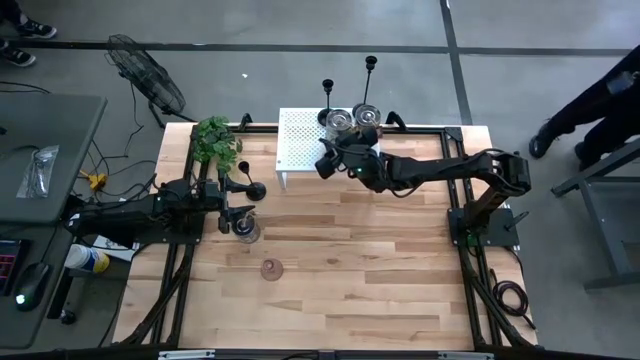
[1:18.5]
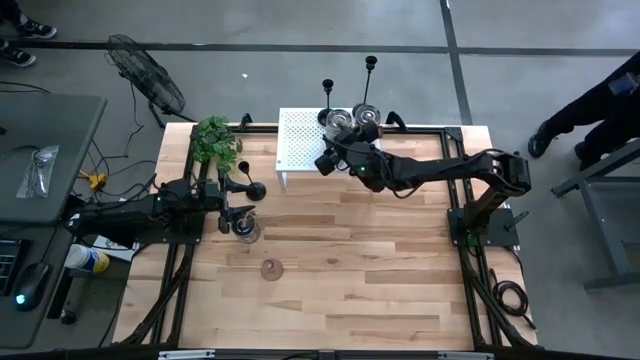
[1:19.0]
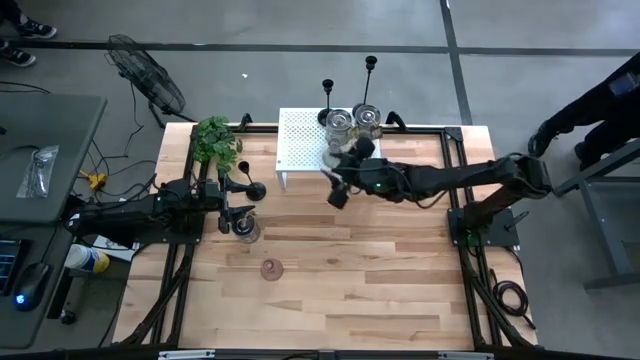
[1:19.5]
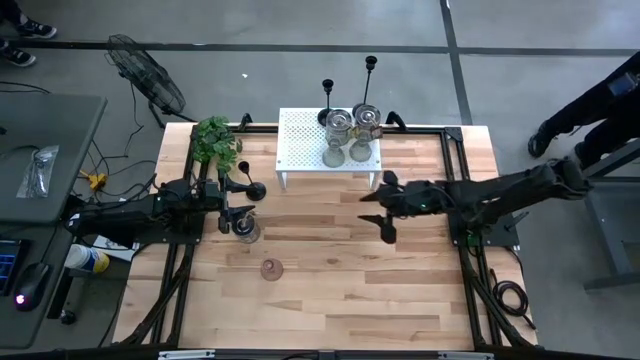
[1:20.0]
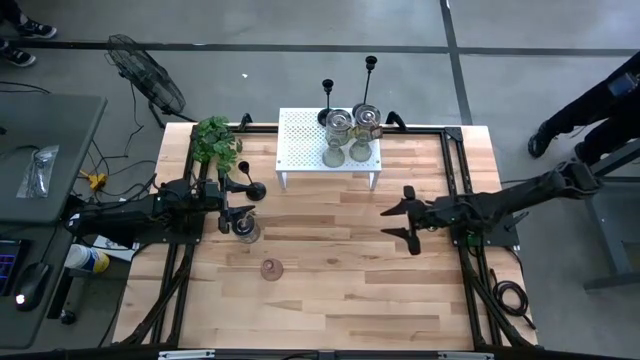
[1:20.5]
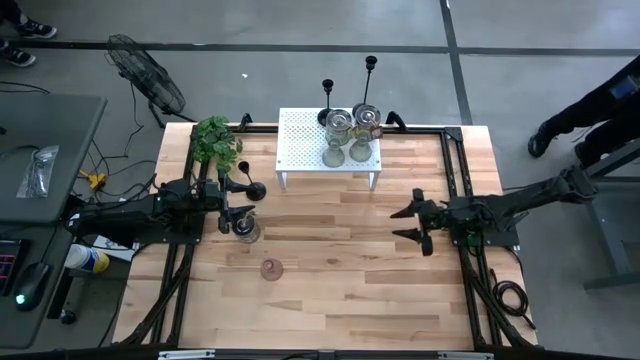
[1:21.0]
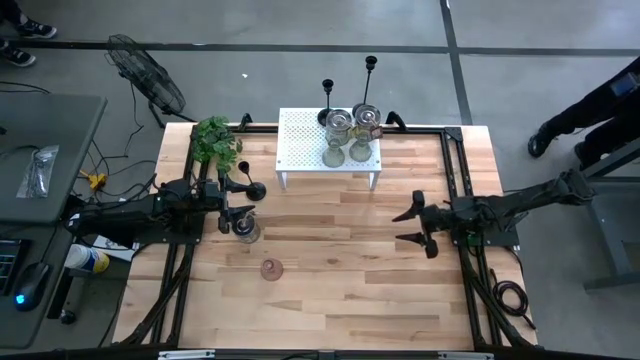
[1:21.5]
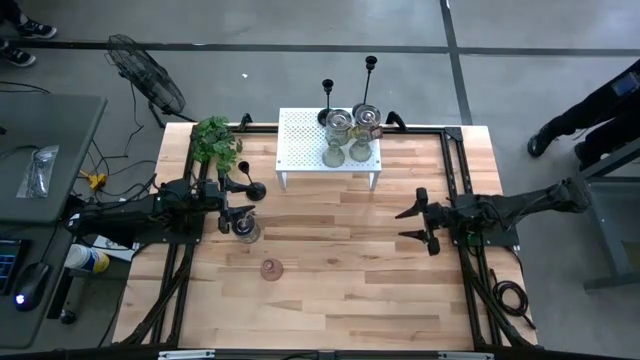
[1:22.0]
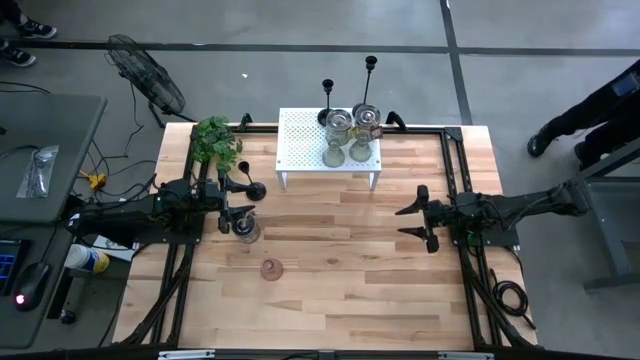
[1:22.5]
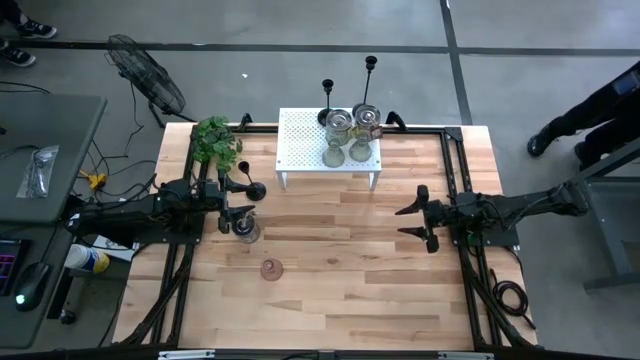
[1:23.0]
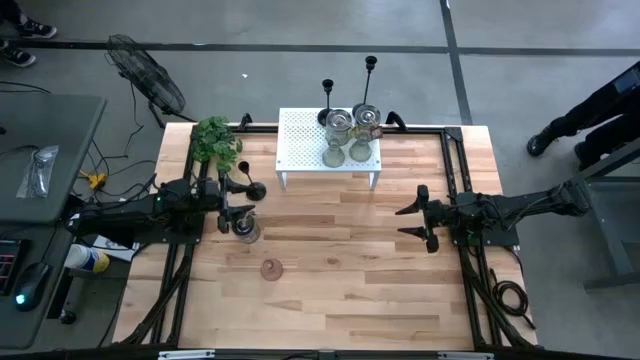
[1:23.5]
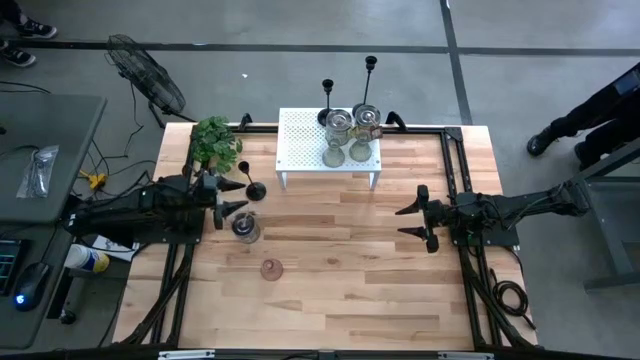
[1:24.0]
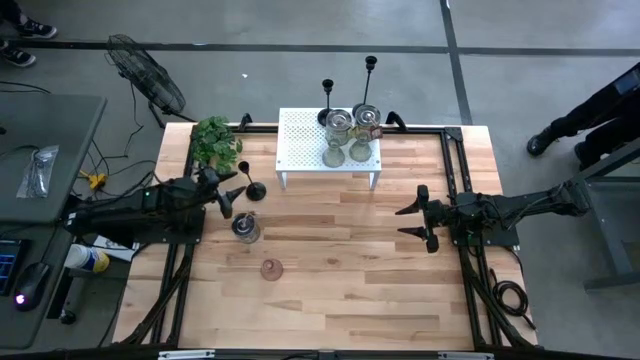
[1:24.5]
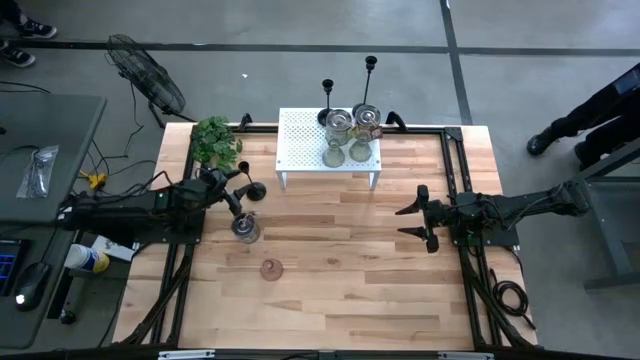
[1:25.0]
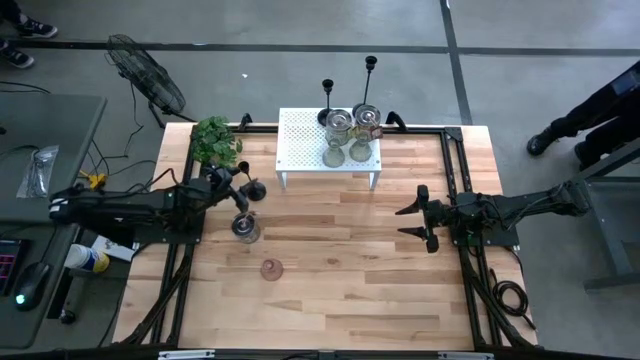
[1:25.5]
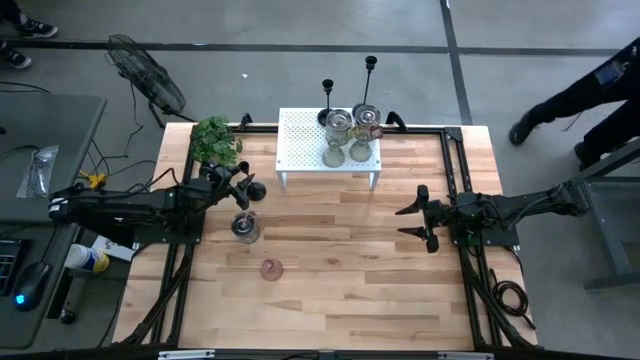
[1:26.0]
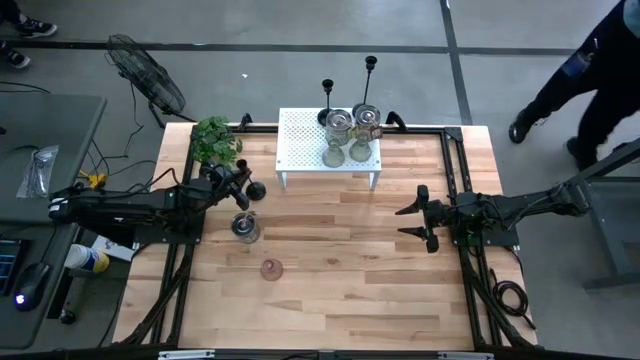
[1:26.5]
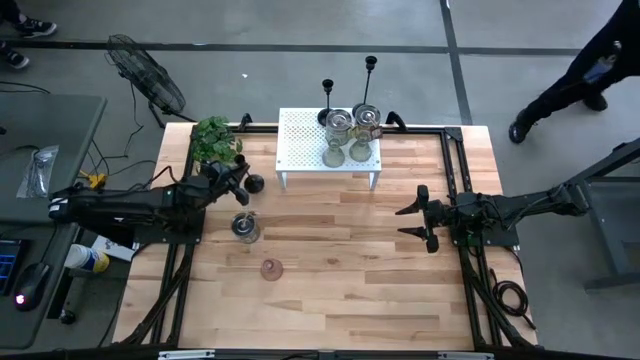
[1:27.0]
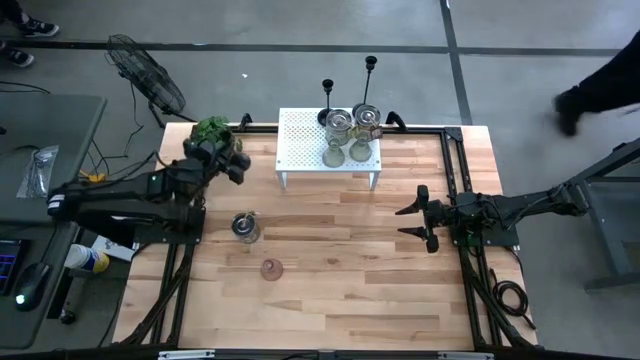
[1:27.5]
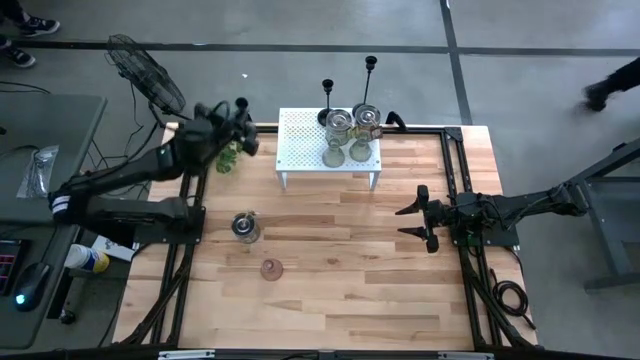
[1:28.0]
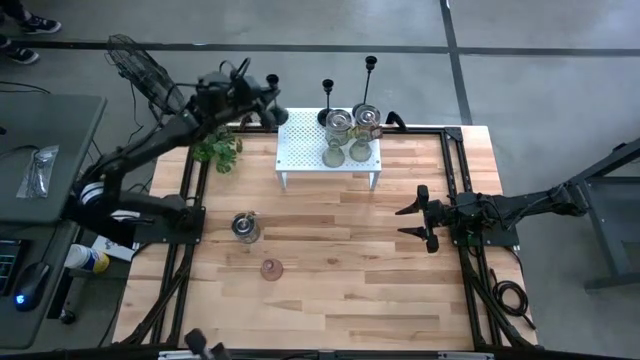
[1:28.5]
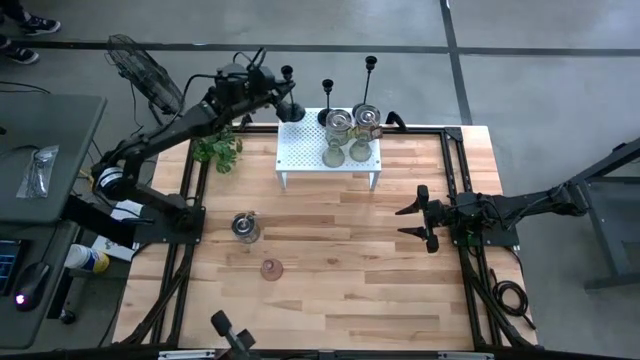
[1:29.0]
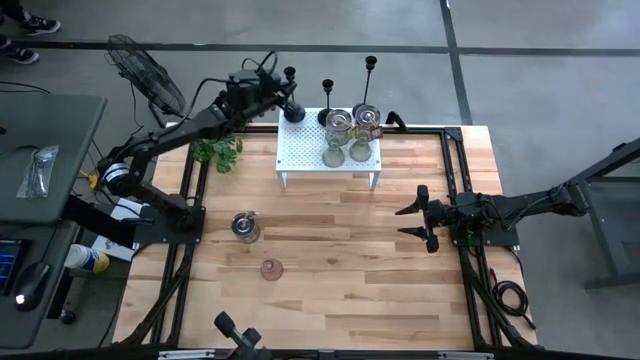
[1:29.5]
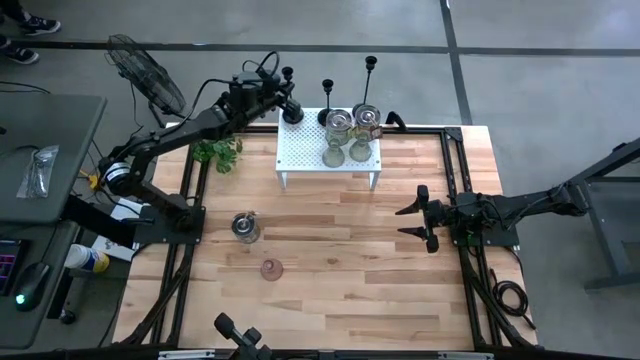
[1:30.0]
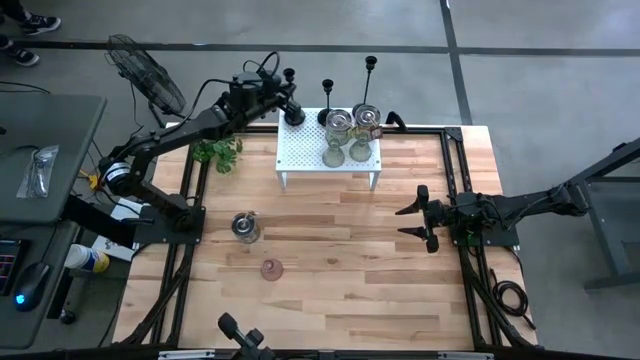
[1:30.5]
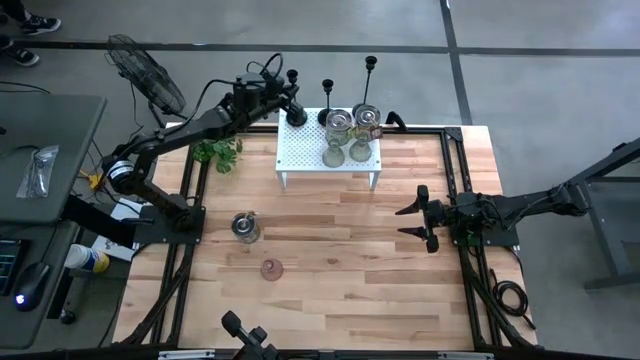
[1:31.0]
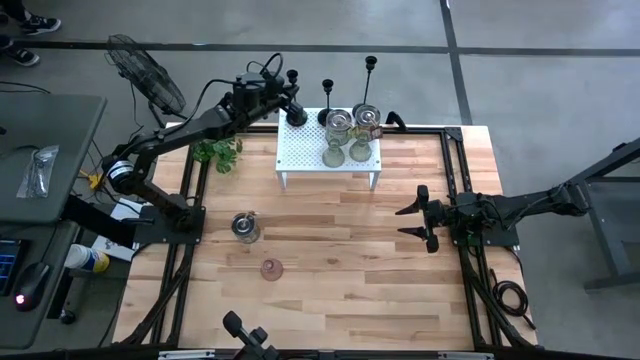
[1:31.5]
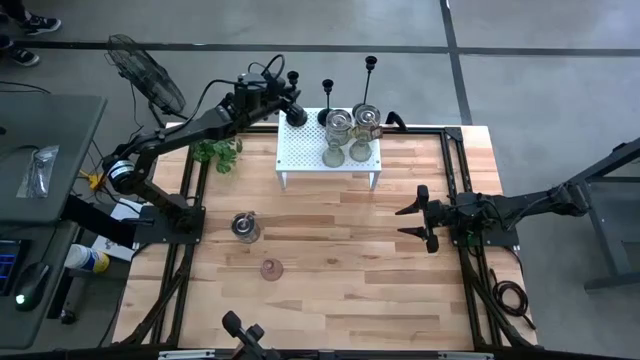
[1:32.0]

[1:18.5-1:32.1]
Task: Pick & Place candle stick holders
Put the black candle holder on the shelf

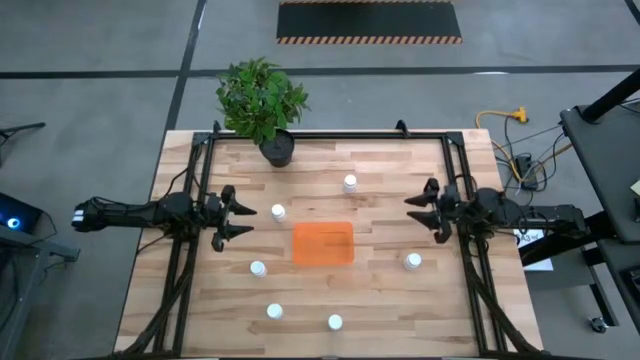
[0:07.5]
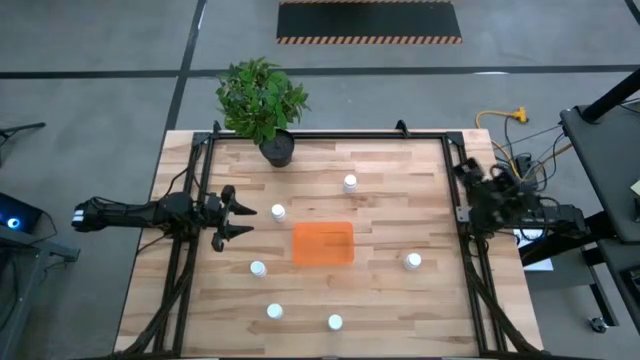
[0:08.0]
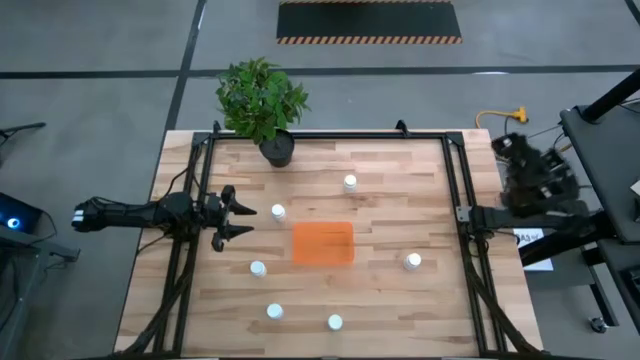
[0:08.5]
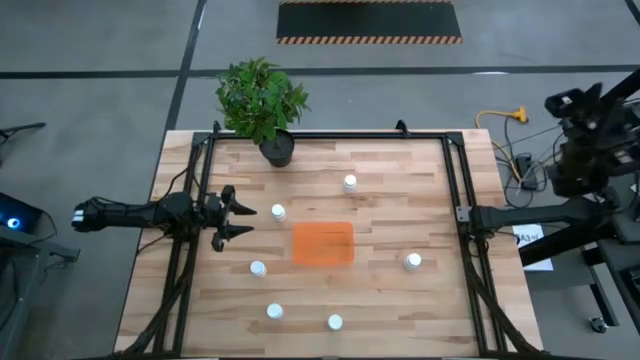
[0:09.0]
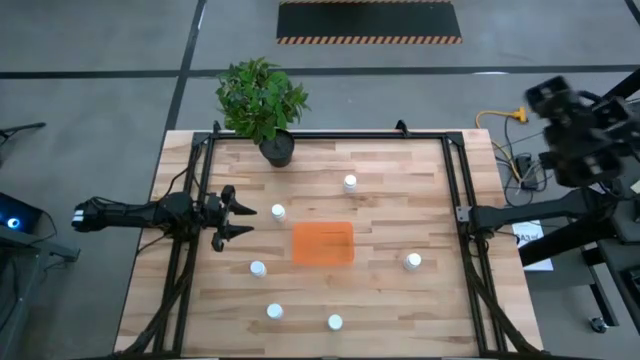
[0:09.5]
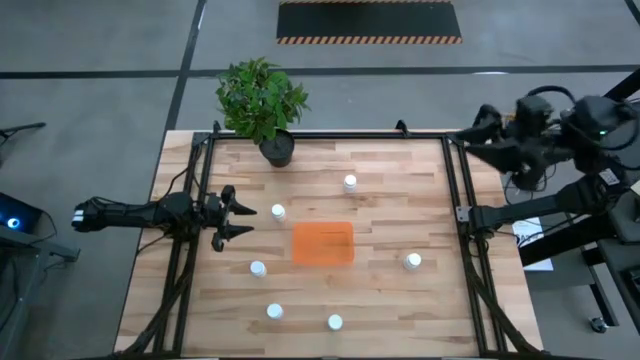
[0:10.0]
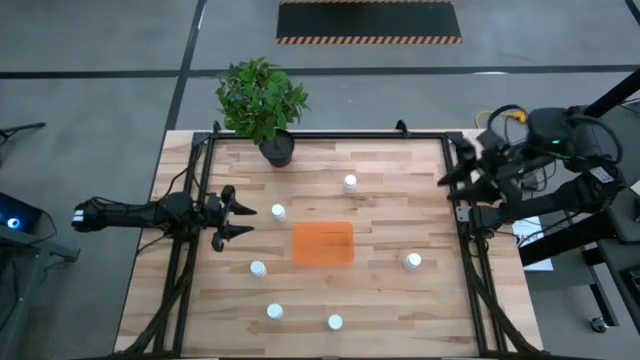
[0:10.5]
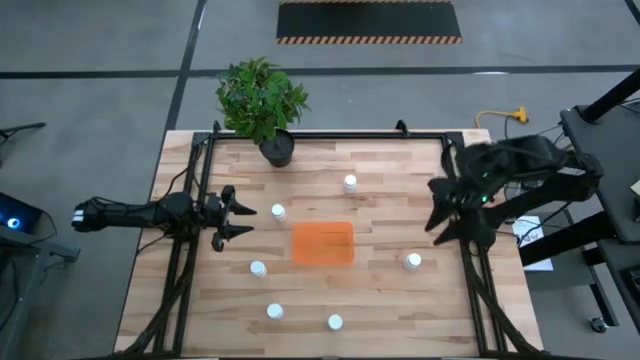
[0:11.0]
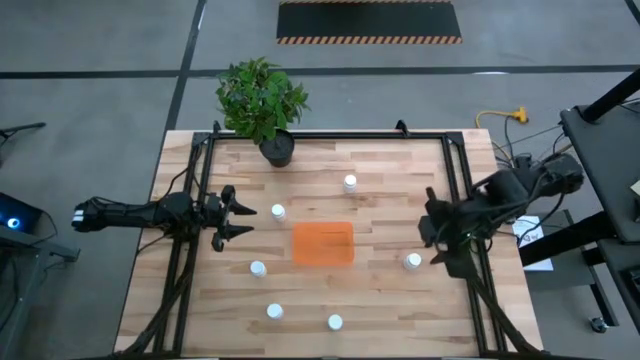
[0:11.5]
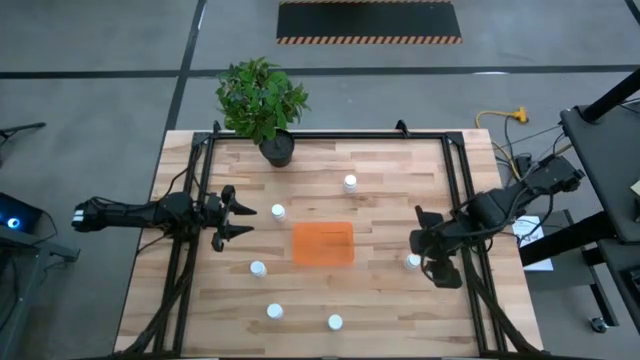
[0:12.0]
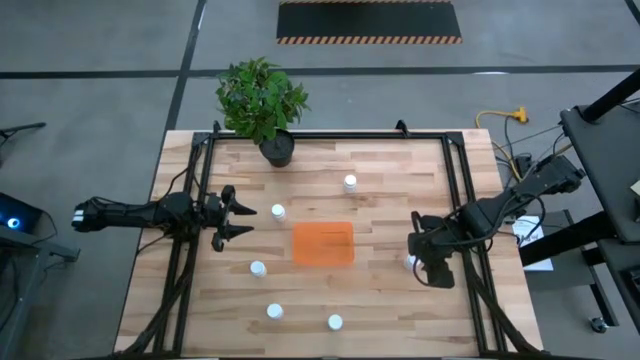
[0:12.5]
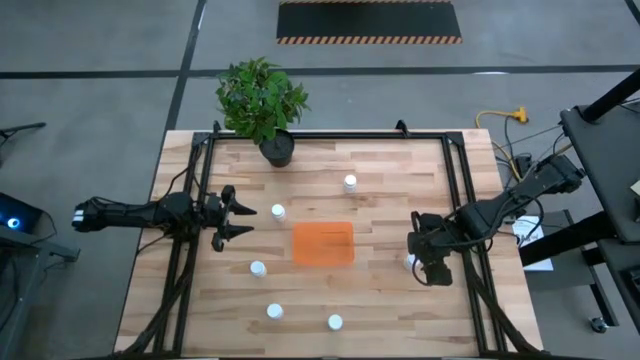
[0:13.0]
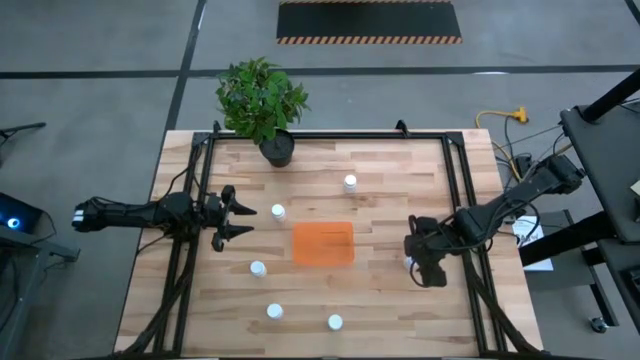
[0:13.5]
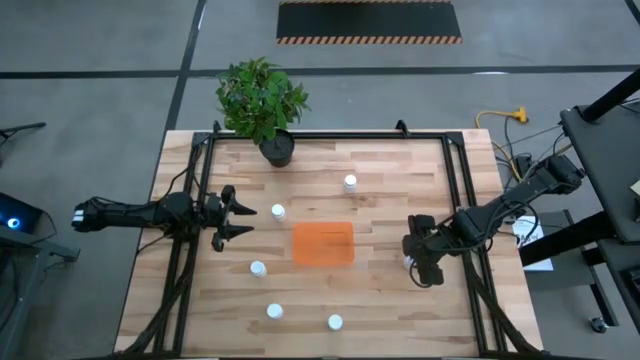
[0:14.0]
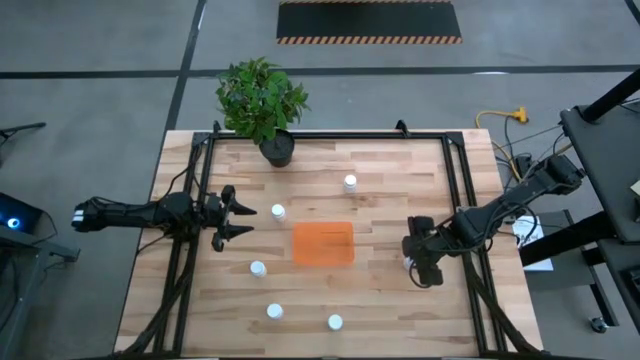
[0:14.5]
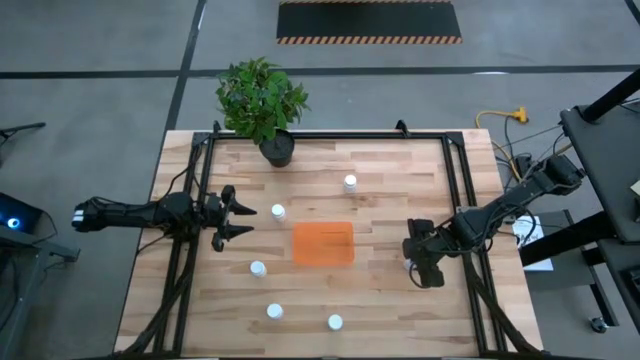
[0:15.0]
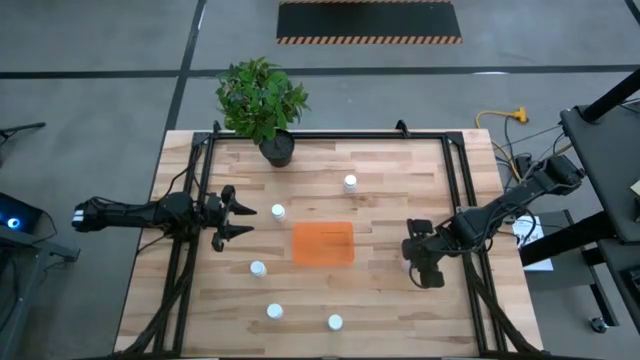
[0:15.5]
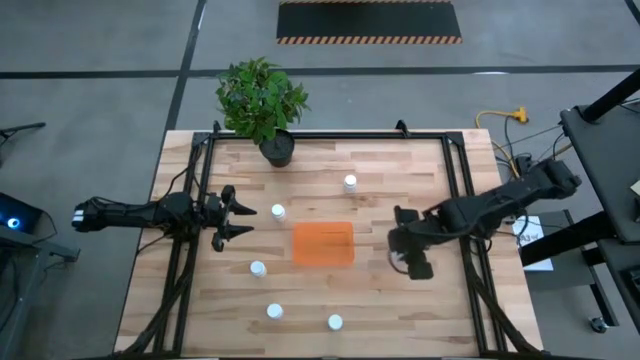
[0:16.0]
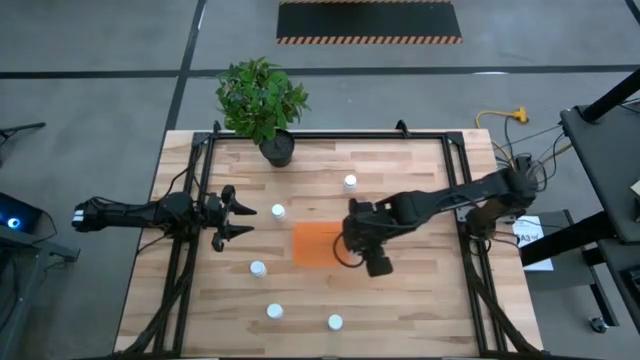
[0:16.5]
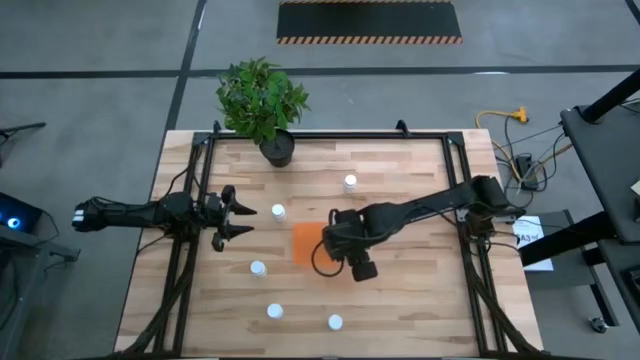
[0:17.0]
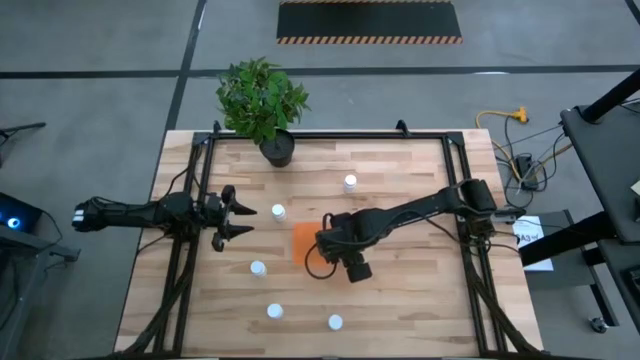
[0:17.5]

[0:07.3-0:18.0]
Task: Pick and place pill bottles into a basket
Put the white pill bottle into the orange bin
